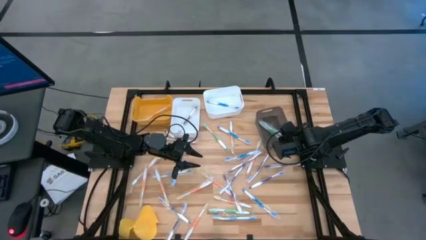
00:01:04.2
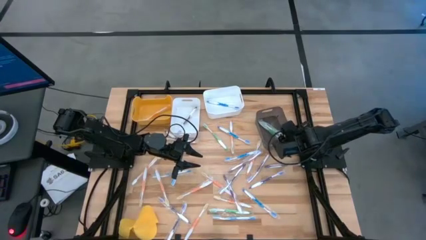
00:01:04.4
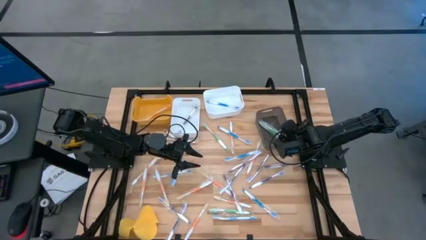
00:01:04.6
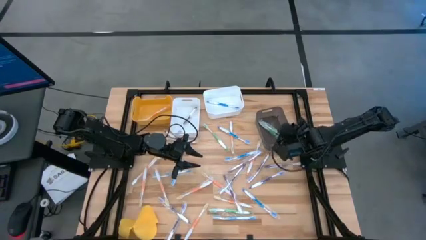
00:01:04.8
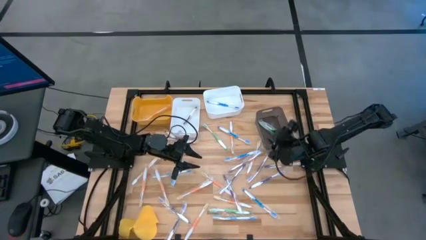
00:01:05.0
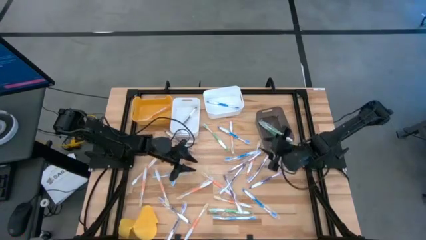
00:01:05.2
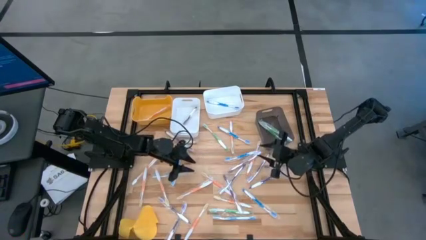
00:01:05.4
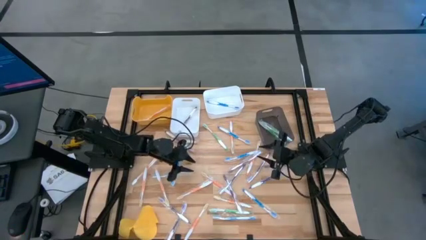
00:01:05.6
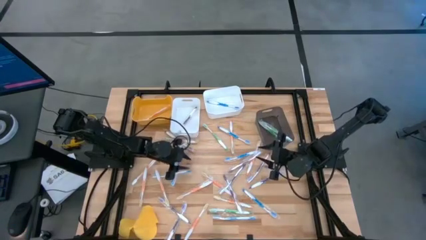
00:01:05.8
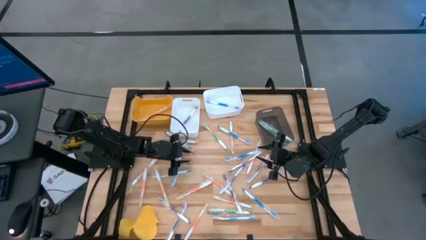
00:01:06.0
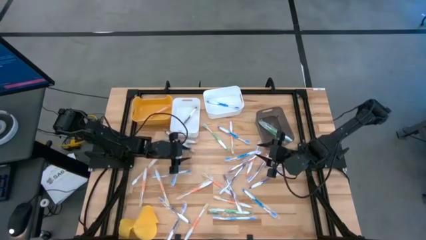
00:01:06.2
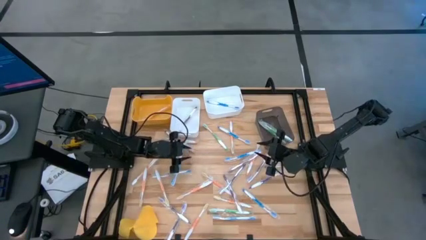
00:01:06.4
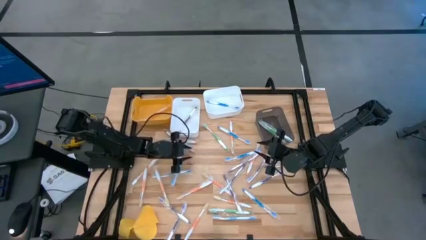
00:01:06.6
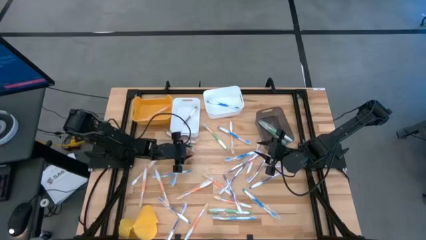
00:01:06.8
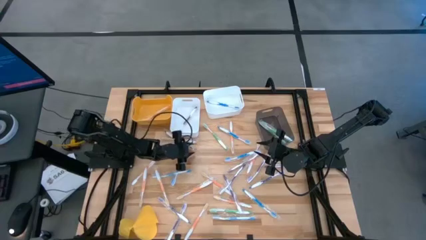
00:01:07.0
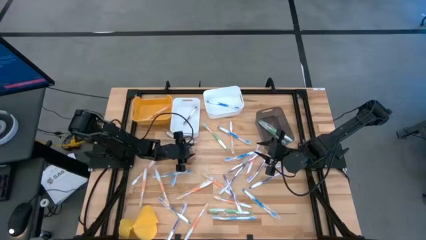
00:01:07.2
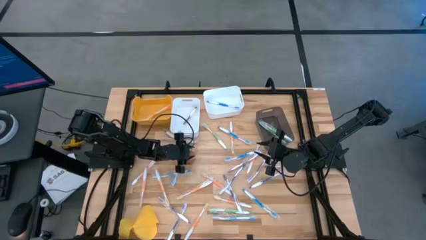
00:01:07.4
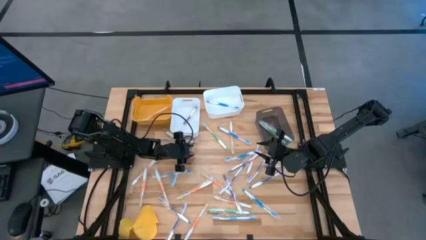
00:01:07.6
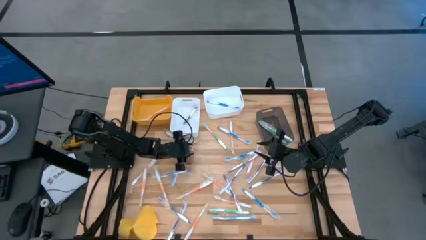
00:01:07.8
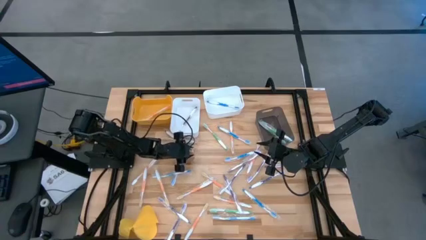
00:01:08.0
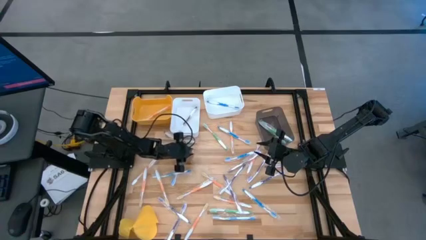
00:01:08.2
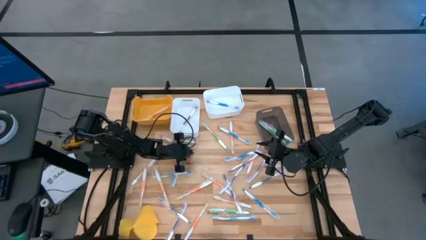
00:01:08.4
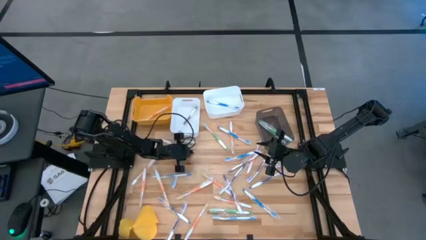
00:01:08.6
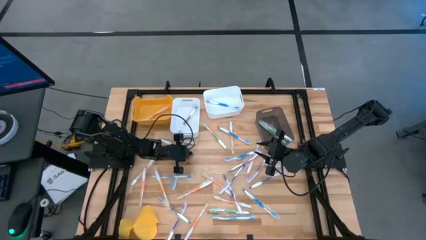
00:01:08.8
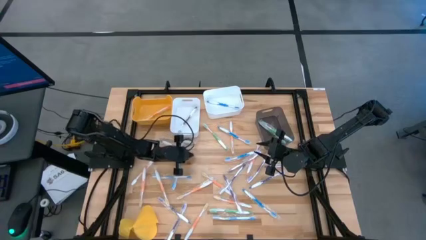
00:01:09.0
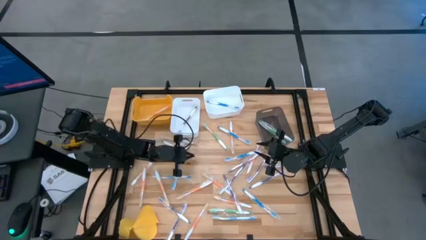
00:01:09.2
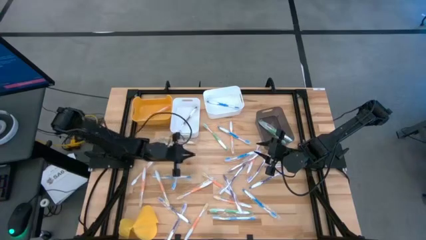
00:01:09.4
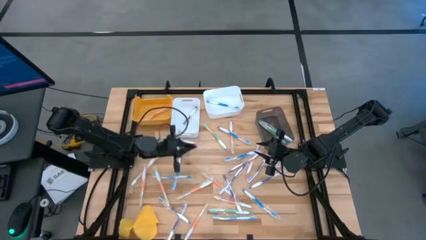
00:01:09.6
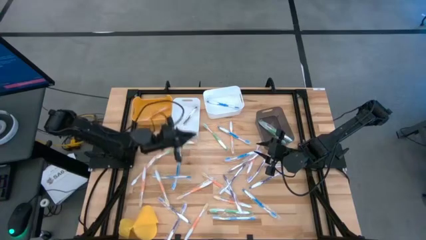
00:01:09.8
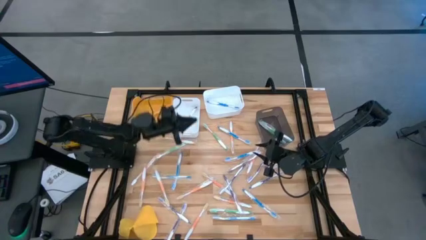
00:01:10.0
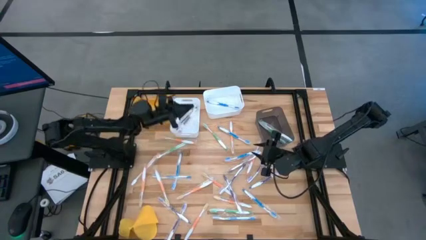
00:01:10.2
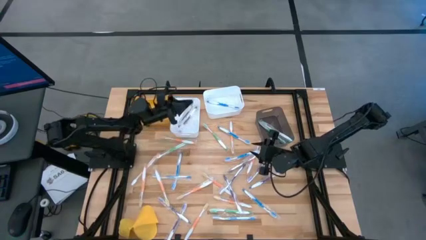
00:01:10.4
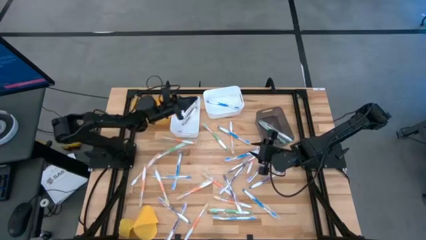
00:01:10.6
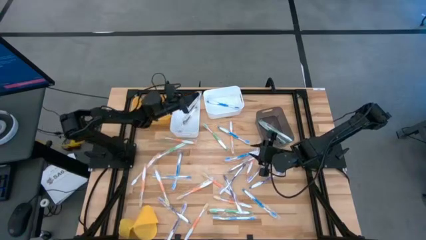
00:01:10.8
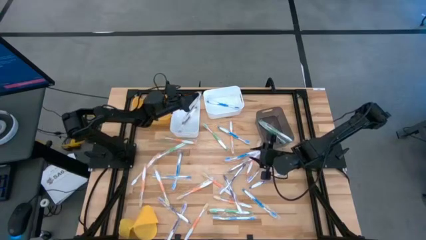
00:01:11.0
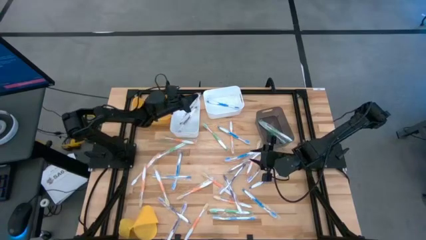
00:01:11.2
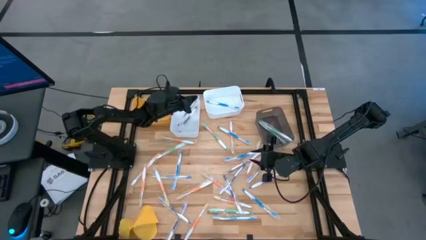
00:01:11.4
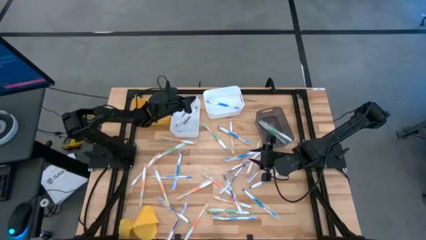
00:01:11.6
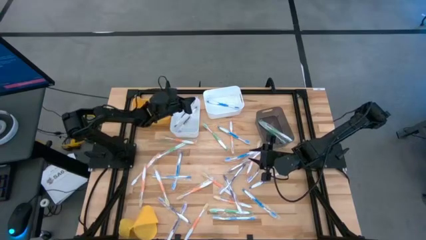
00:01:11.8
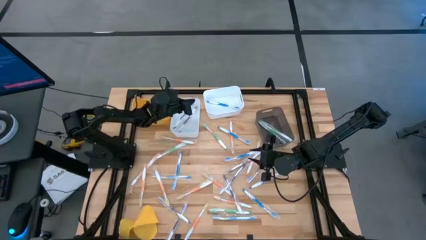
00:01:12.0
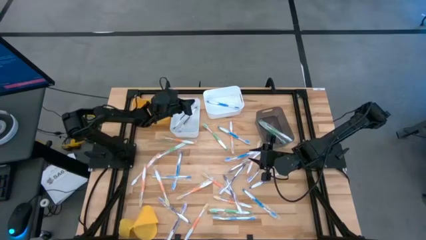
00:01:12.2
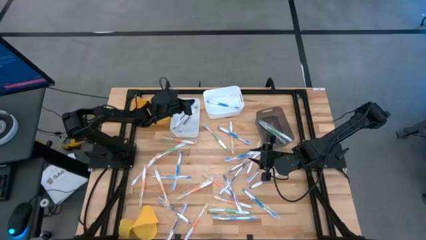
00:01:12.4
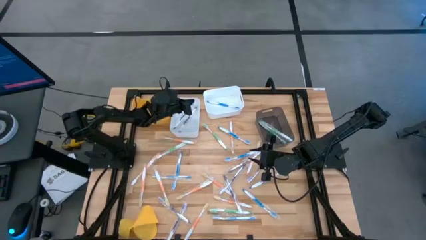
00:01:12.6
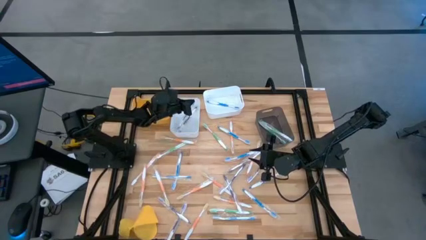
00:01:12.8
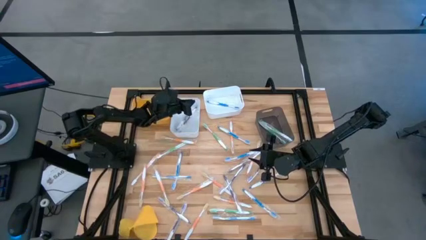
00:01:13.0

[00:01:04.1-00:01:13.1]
Task: Pick & Place Toothbrushes
Put the purple toothbrush into the left white bin

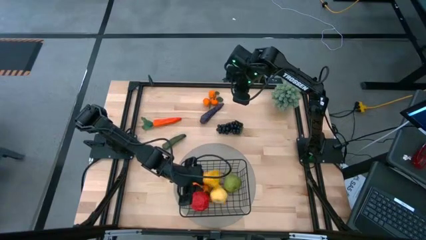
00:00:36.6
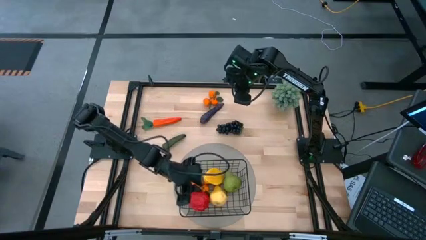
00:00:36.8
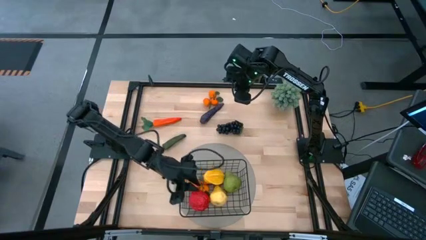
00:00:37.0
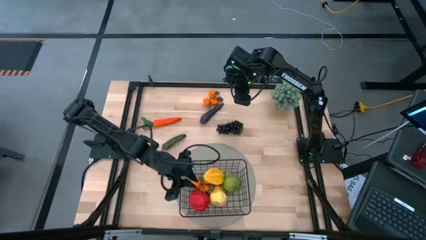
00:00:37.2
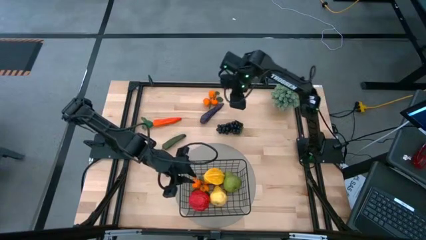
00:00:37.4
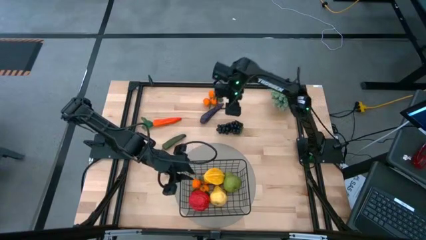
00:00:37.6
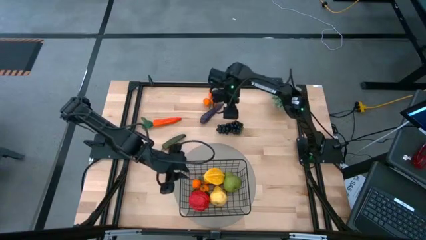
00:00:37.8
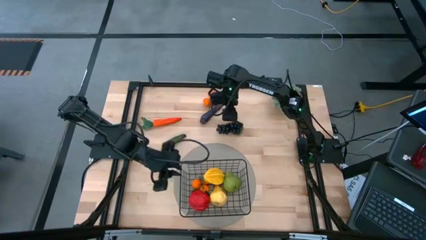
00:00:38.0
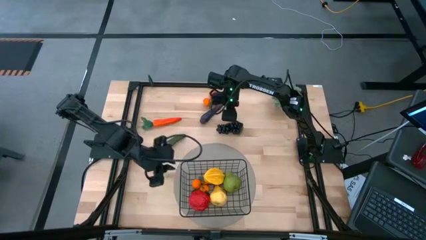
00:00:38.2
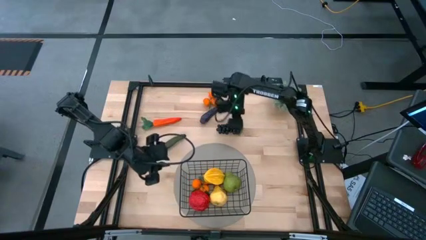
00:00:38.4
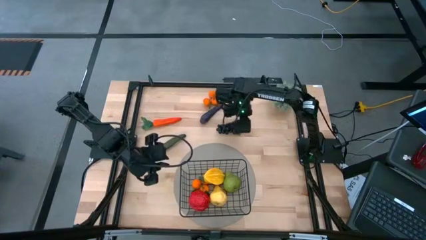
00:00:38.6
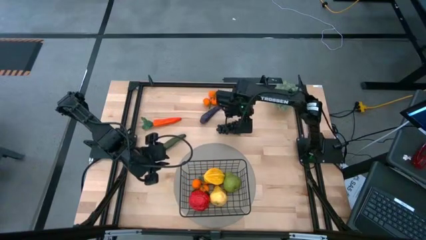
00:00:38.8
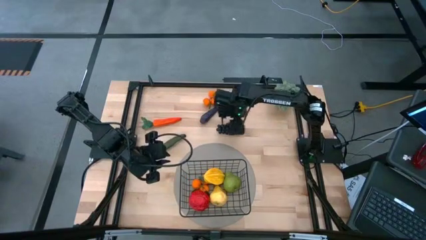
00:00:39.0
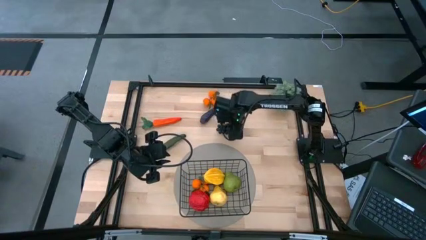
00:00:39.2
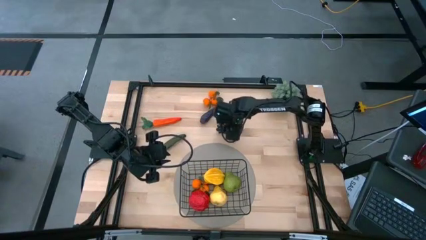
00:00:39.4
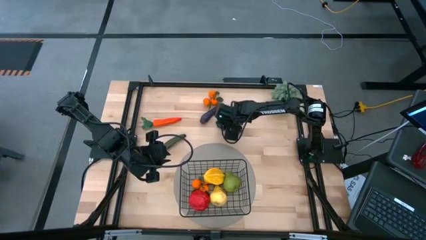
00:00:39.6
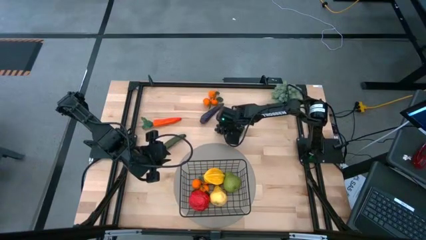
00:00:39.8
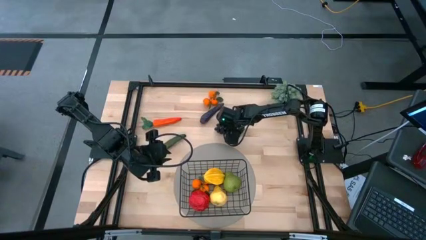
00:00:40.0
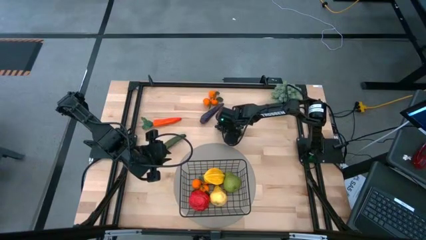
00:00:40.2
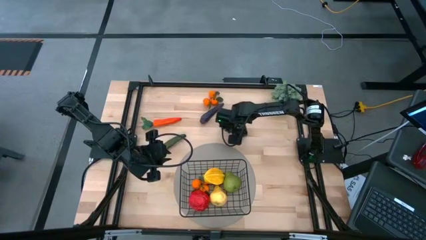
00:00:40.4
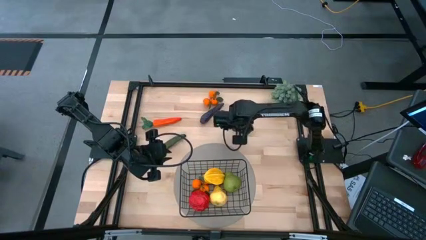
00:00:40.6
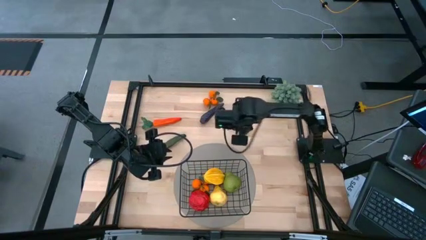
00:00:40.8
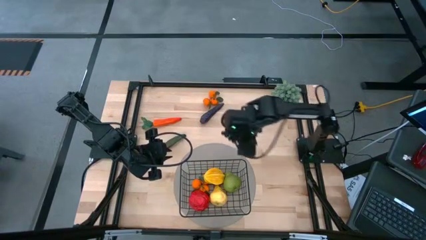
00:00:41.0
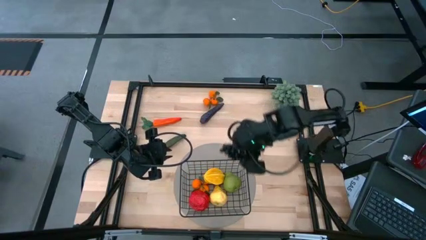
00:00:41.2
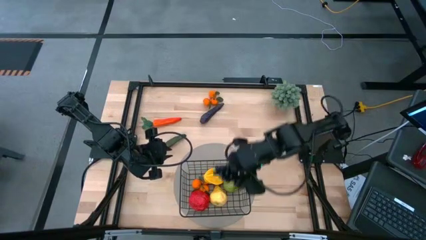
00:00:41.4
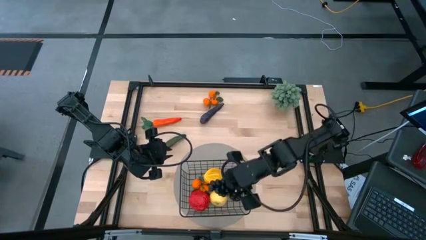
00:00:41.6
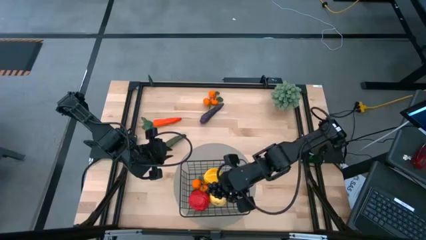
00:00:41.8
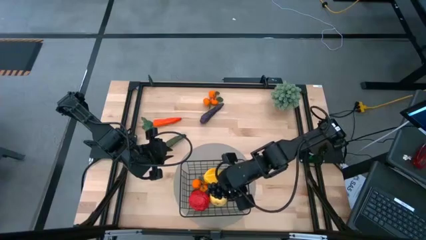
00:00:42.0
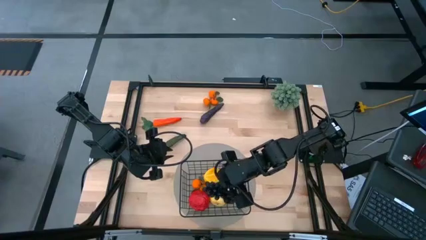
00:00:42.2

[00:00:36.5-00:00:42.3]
Task: Build produce basket
Put the grapes into the black wire basket

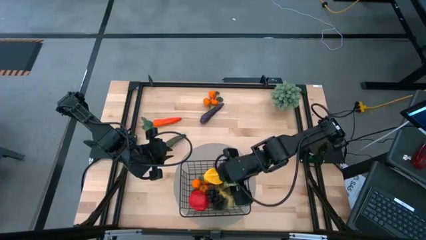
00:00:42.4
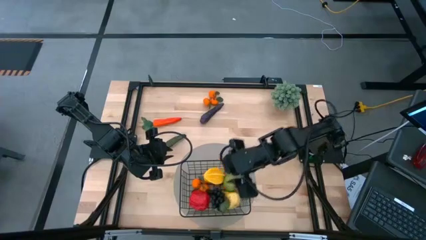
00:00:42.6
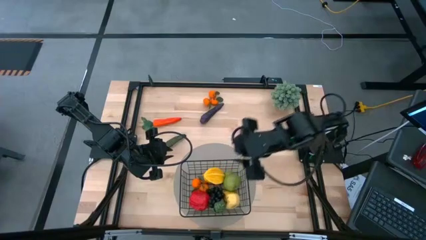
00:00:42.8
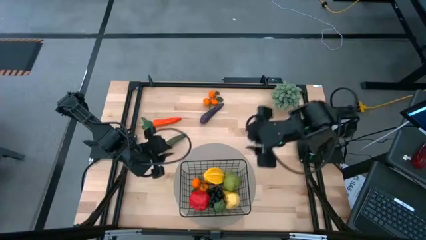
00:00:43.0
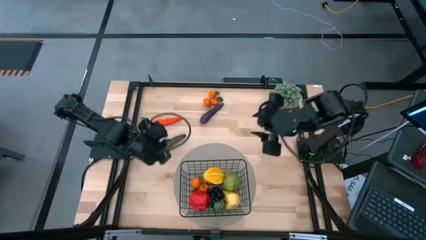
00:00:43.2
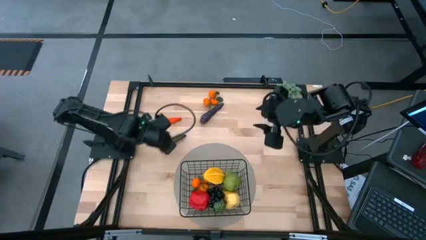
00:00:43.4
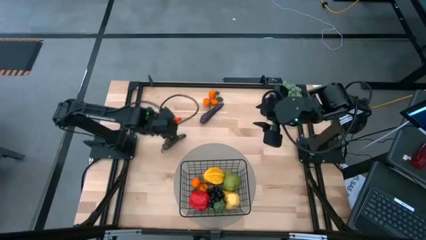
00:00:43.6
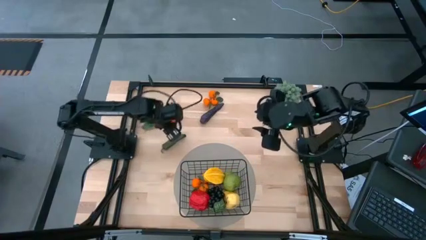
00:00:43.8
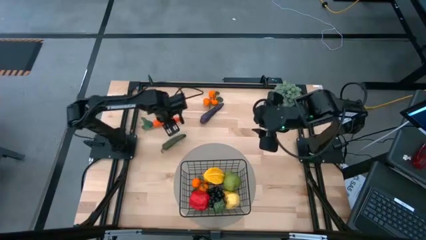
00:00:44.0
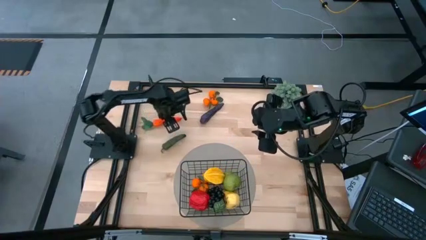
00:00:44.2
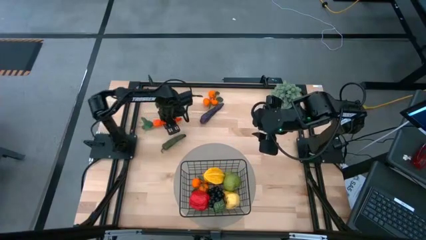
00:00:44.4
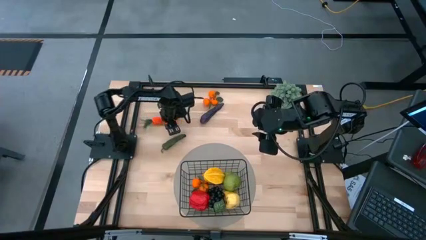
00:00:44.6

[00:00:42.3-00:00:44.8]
Put the carrot into the black wire basket
